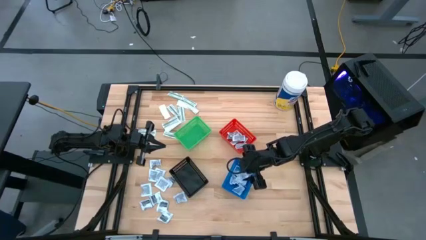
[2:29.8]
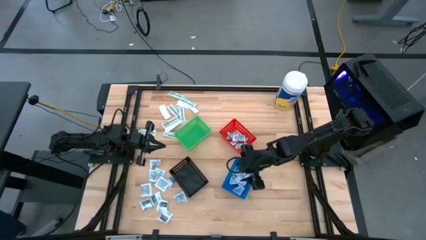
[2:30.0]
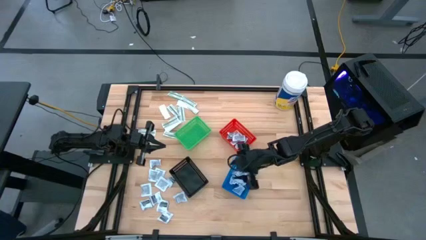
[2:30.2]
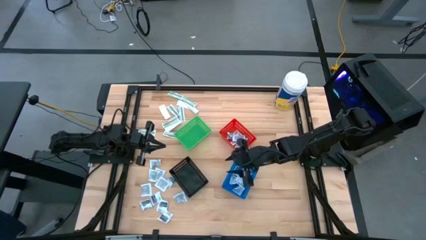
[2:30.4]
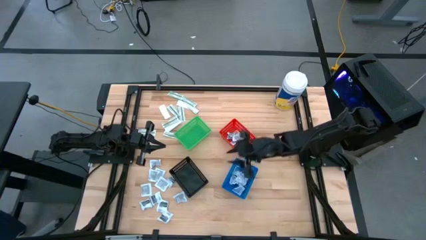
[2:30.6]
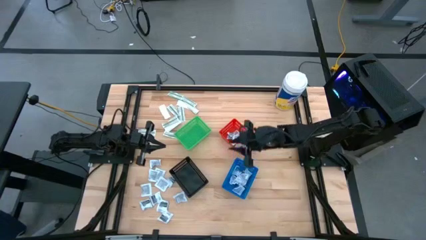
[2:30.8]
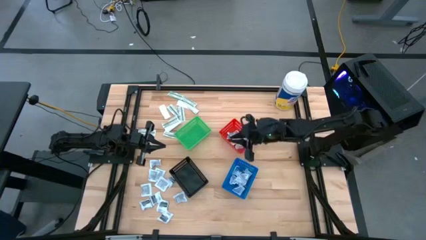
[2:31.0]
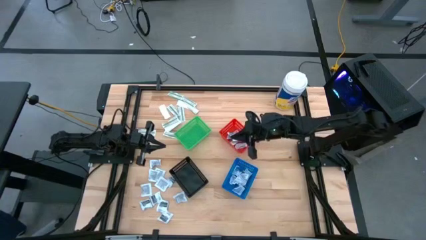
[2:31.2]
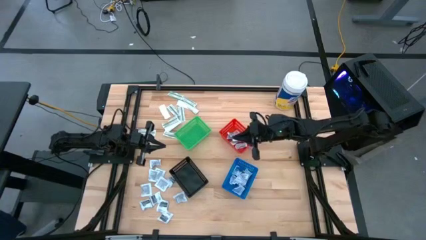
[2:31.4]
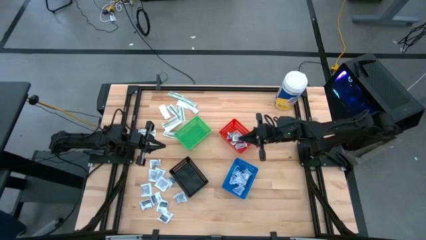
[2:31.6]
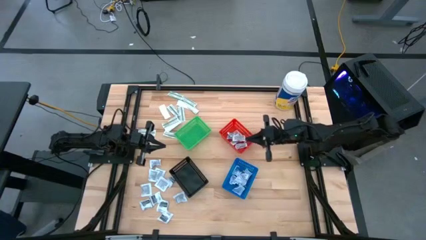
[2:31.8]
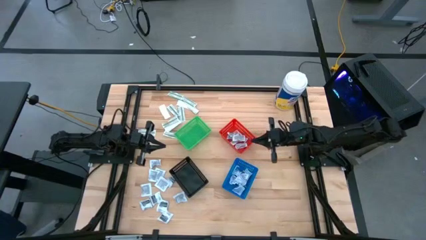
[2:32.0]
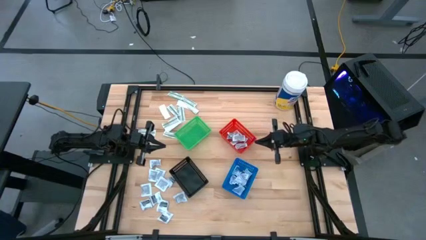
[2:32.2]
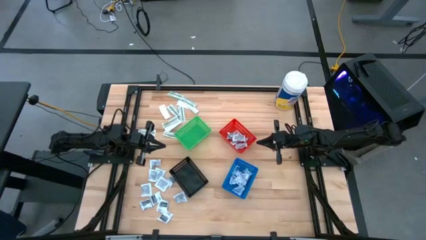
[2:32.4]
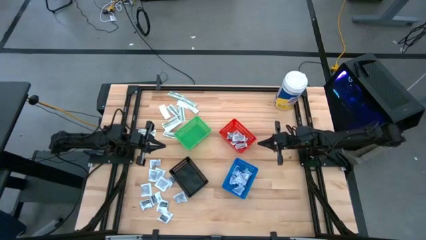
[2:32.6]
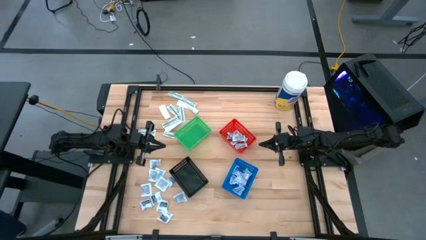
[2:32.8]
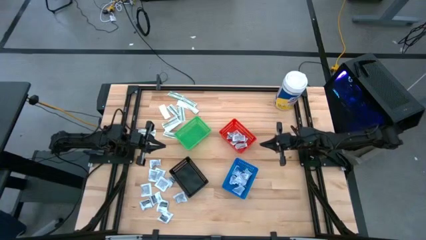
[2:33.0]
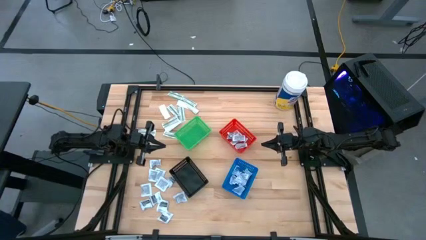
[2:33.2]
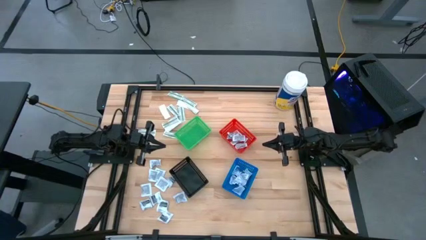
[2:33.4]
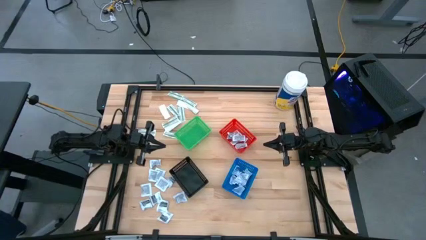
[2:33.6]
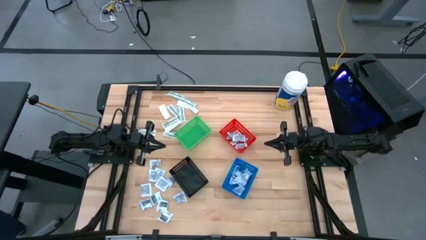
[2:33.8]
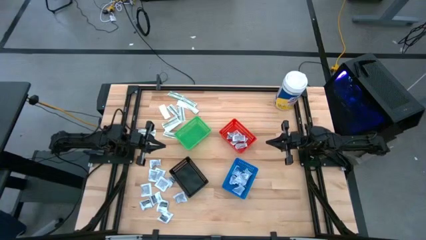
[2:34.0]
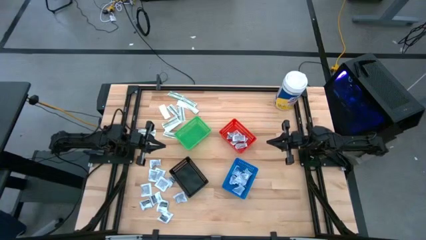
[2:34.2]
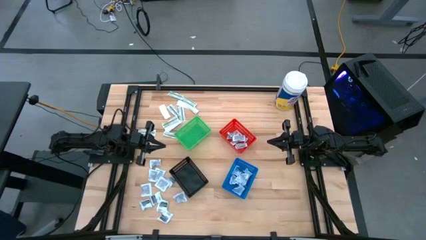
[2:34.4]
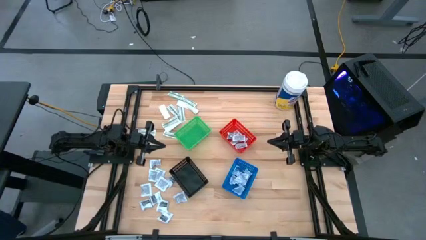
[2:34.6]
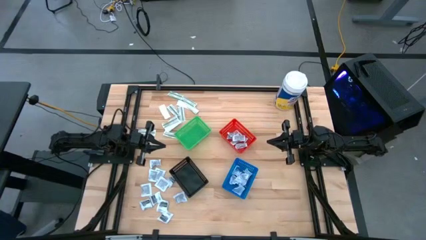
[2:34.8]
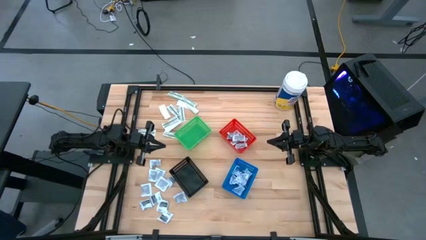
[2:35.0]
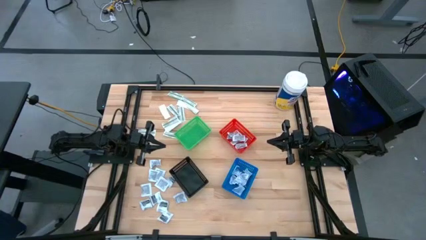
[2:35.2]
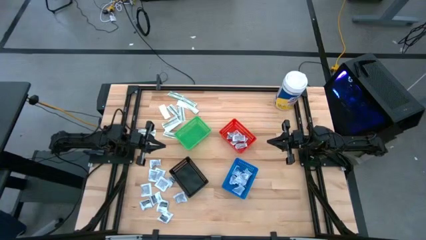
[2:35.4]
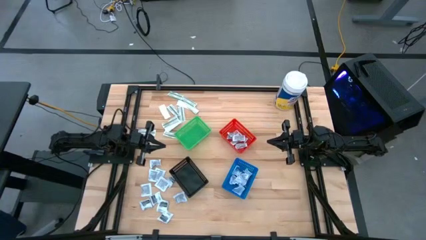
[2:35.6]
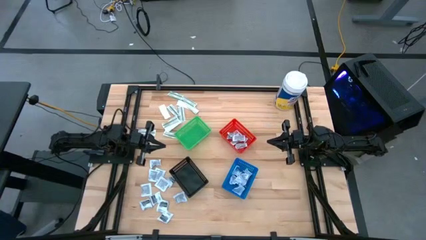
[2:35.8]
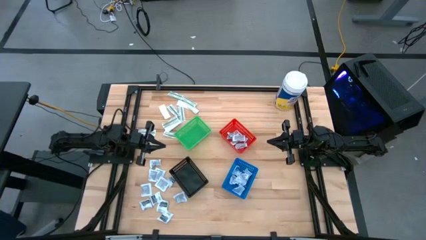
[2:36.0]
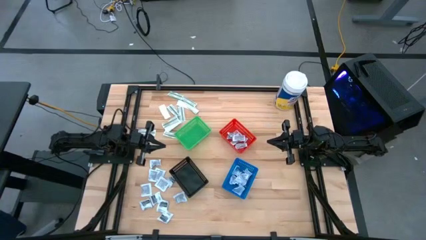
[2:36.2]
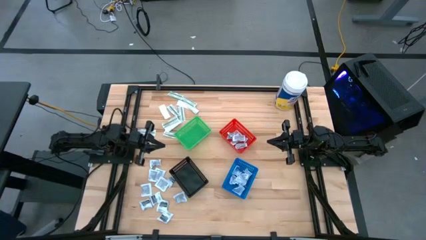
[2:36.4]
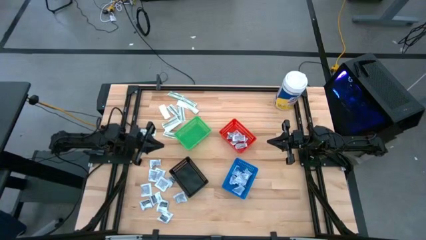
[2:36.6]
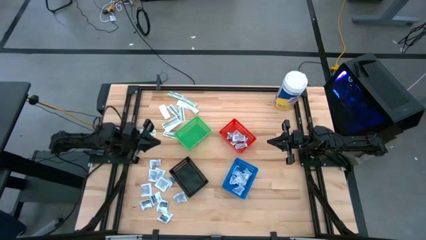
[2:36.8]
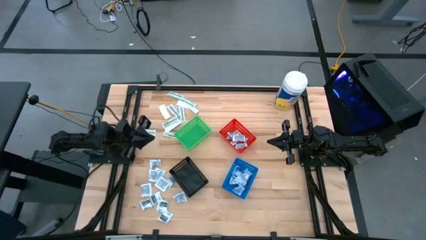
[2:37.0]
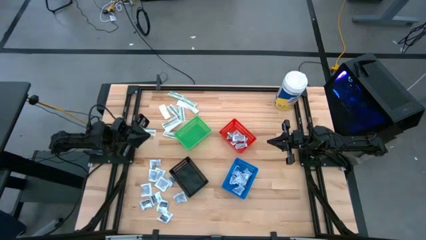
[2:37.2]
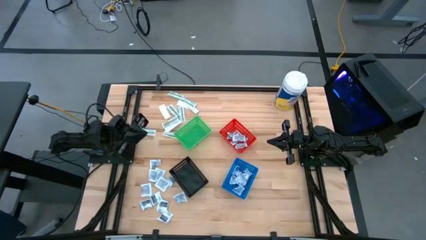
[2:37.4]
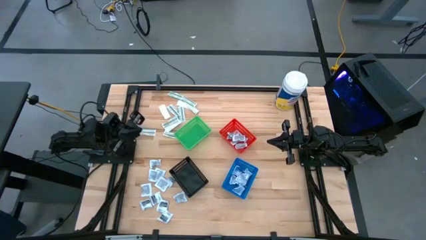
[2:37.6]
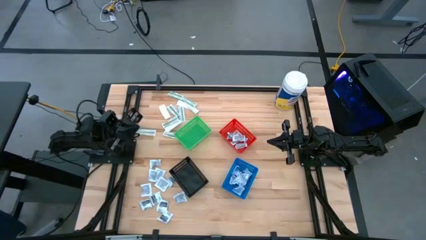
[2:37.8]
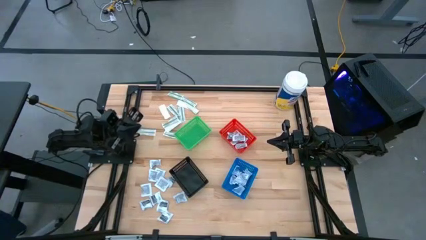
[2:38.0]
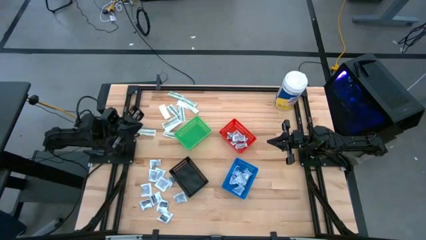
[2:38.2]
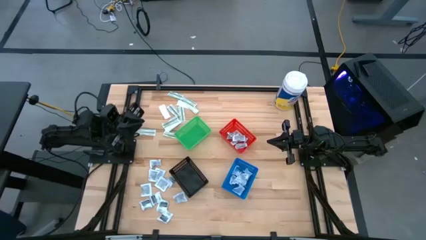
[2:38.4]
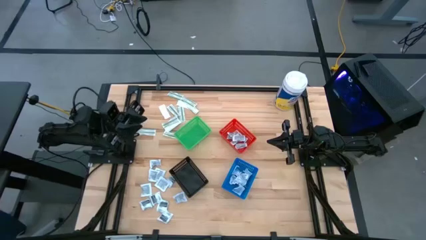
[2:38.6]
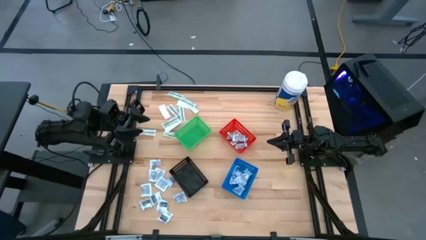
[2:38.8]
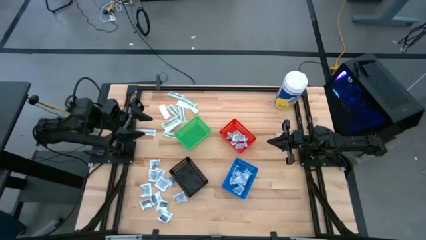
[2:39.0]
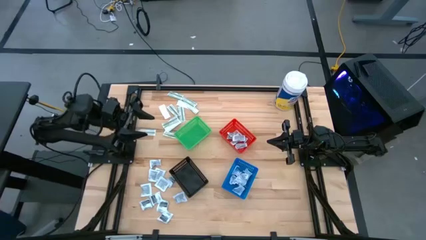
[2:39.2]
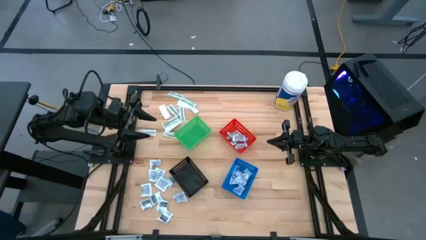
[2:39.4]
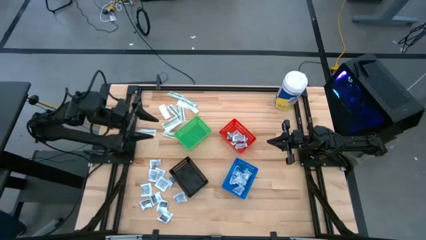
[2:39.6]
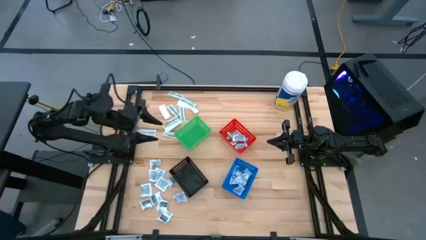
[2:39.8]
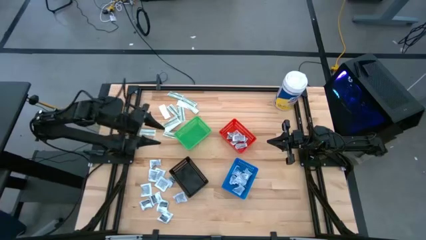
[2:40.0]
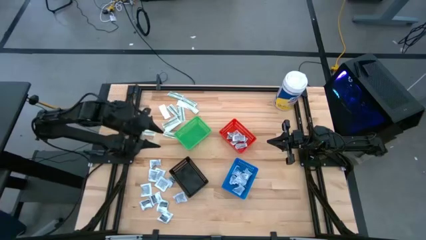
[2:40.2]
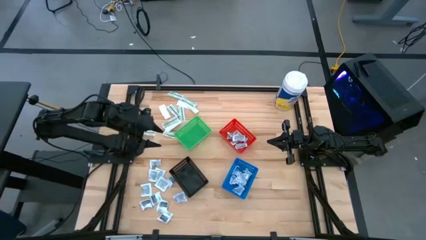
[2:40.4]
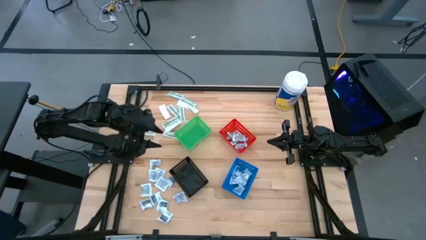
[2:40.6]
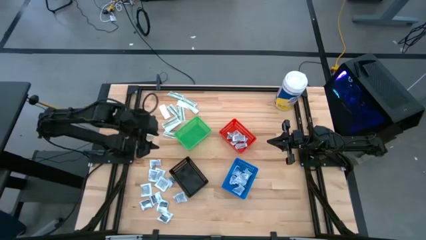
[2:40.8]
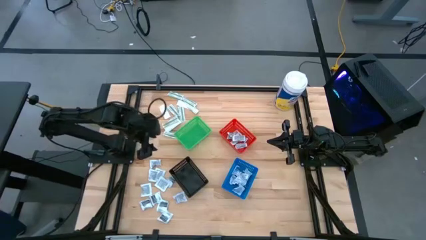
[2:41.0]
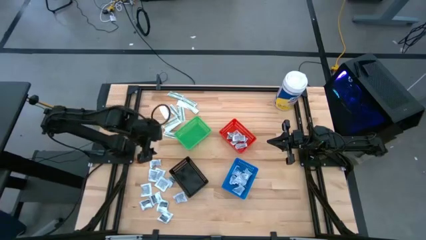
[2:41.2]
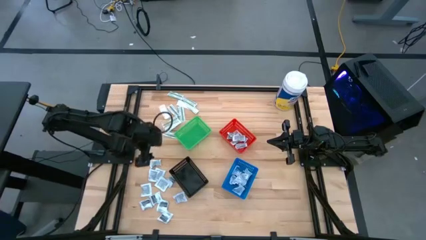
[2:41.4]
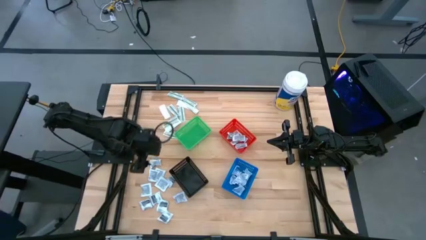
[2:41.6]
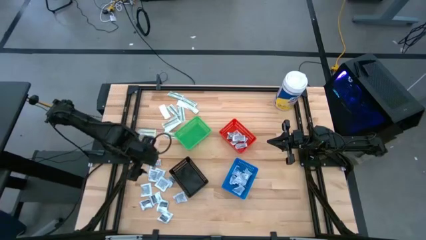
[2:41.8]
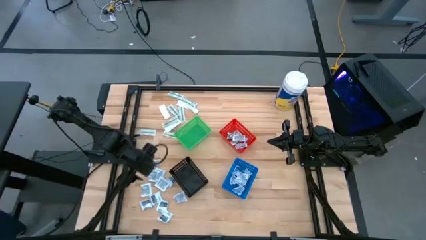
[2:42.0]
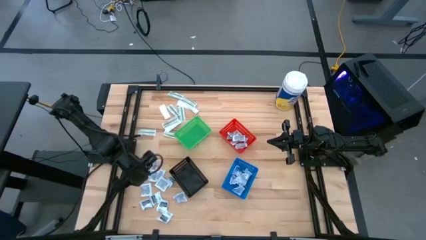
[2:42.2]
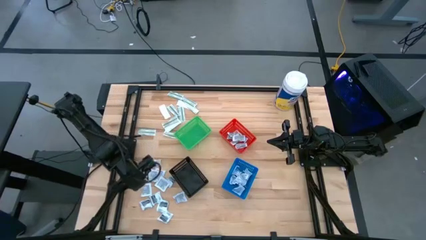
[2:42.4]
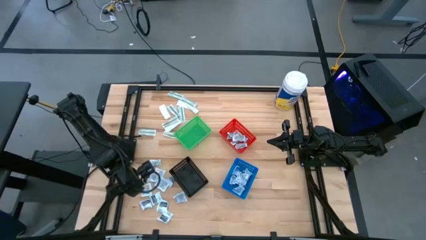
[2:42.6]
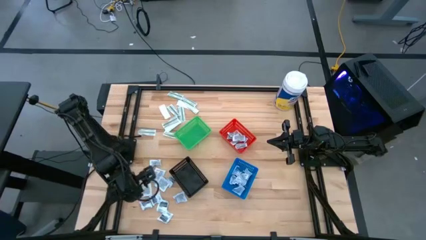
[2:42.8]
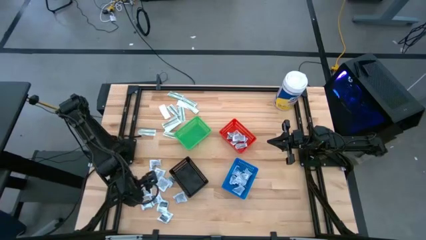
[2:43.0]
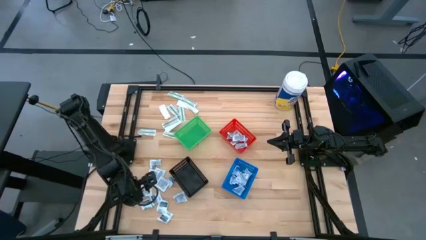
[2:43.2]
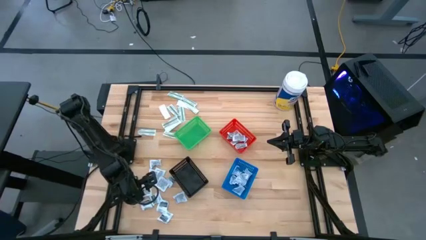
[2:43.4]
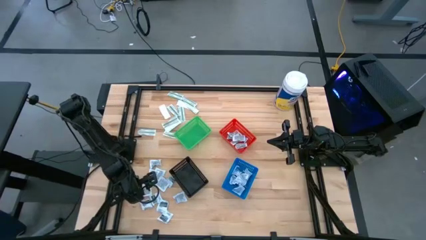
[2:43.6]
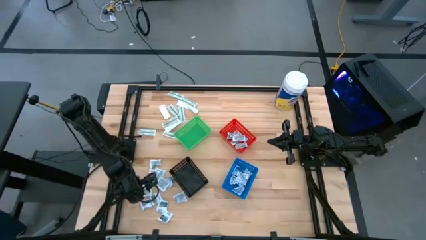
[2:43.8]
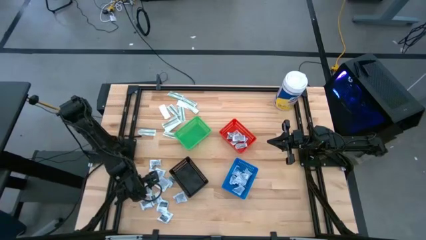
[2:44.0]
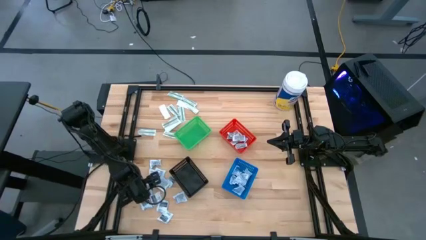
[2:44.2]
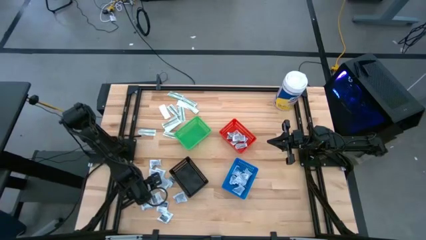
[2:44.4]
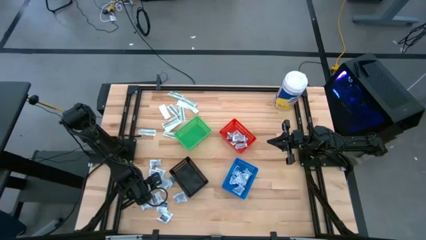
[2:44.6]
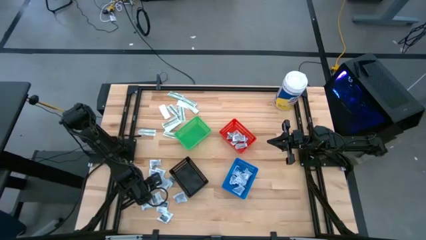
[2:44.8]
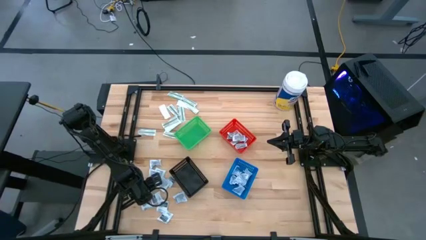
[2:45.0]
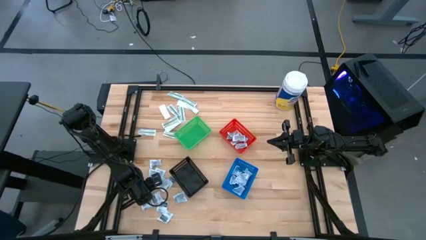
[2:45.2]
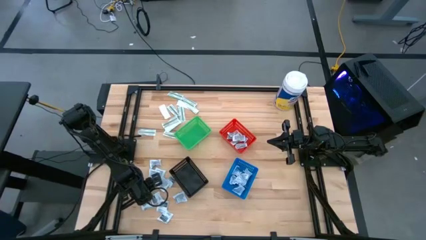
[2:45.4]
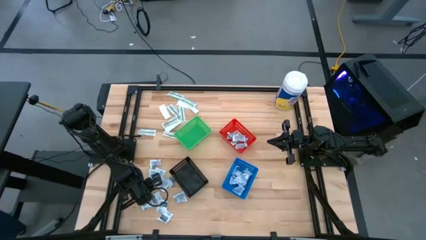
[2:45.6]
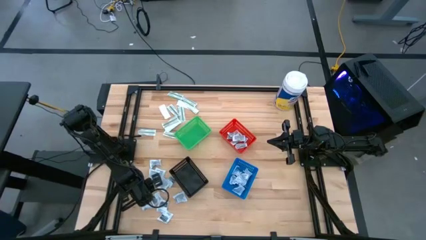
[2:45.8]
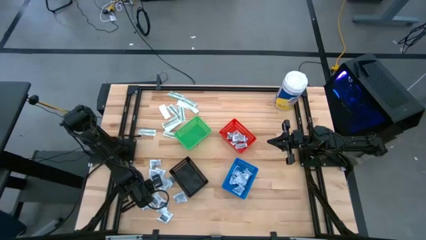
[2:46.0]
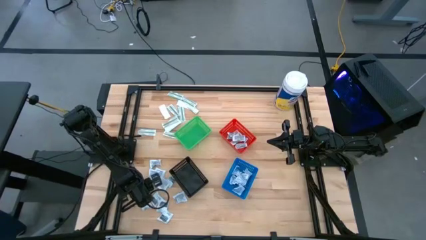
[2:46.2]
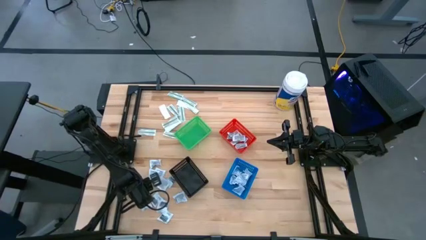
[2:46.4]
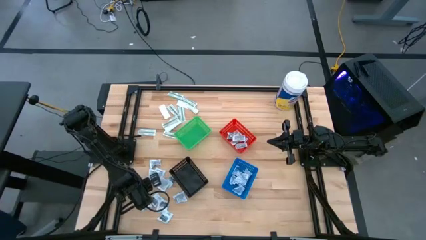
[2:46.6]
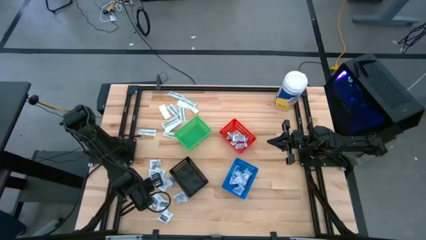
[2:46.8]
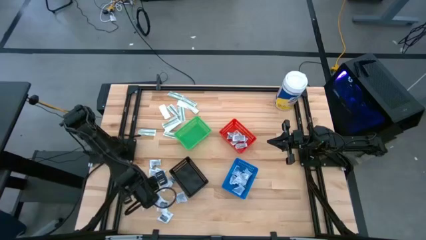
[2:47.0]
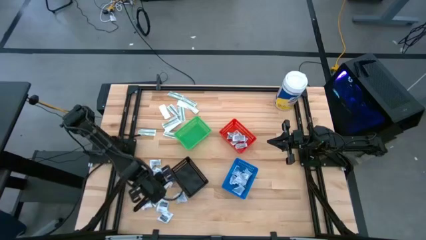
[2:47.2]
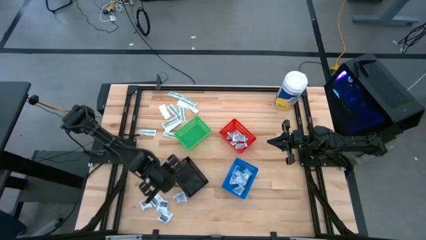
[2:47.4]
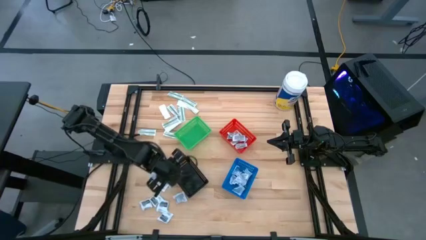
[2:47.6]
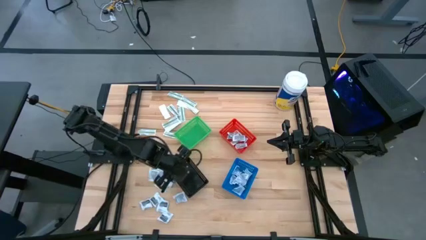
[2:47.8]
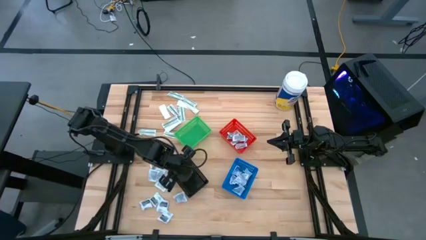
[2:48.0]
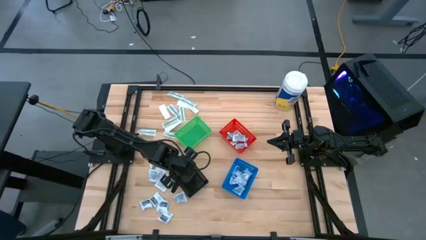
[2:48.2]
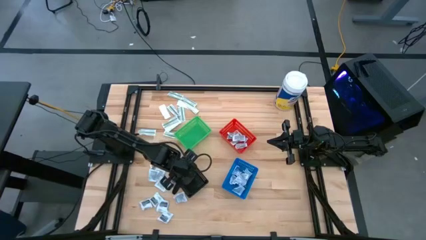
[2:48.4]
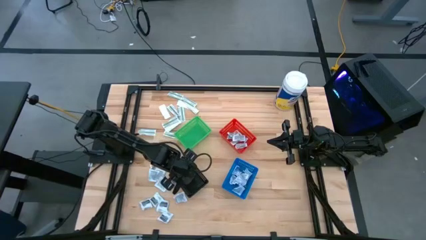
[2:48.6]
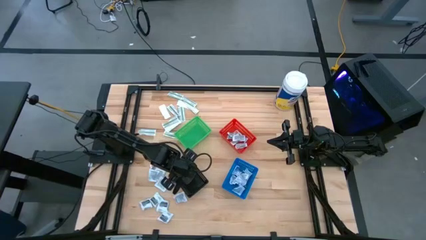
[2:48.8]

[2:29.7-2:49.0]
Task: Pick & Place First Aid Supplies
Put the black towelette pack into the black bin
